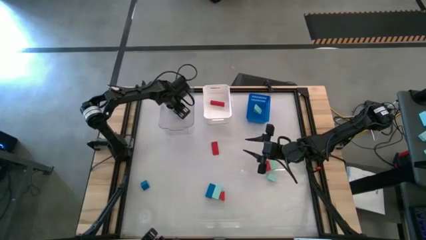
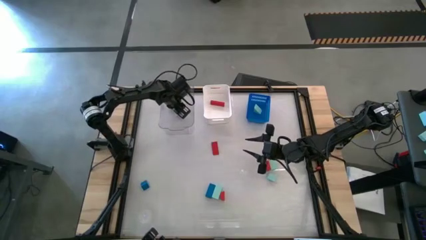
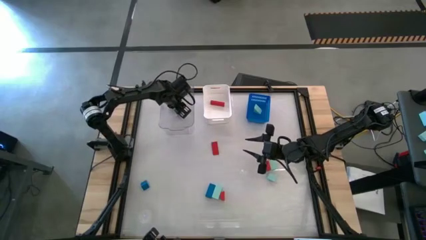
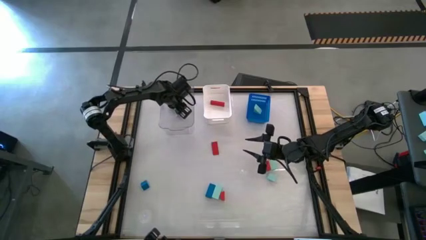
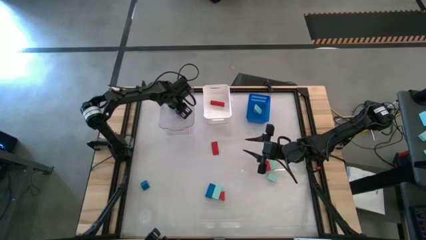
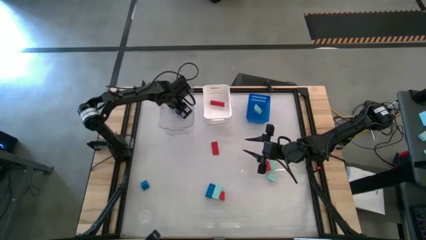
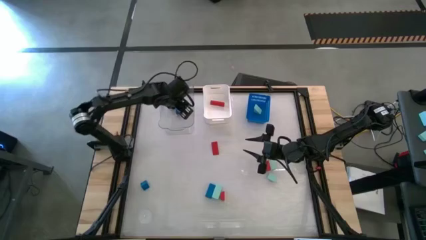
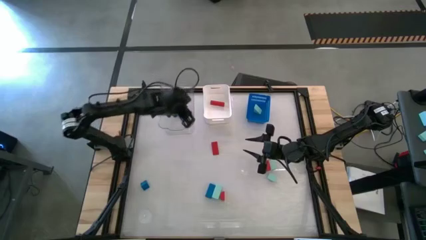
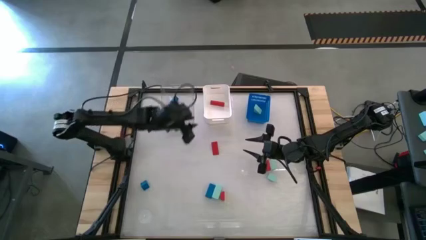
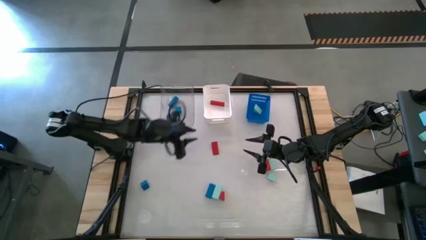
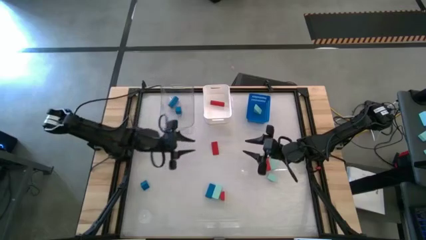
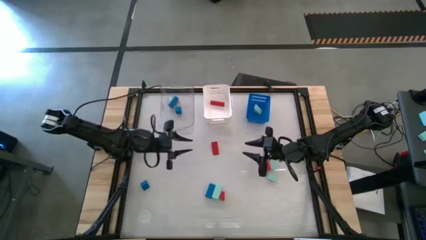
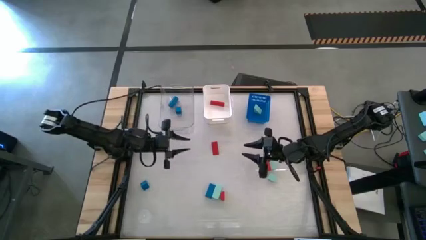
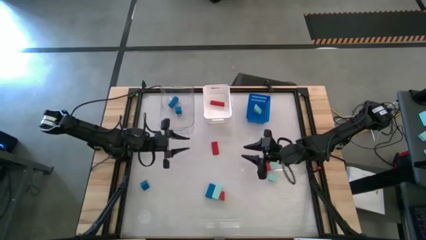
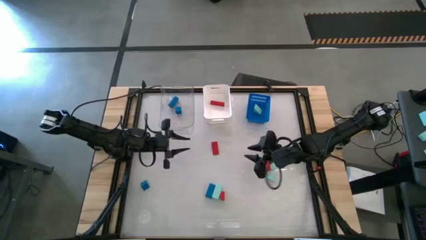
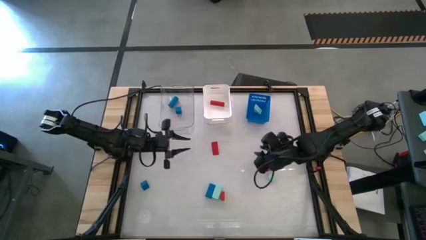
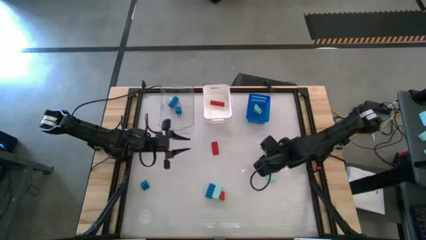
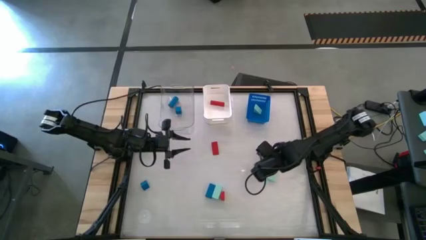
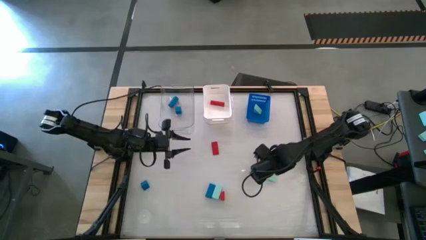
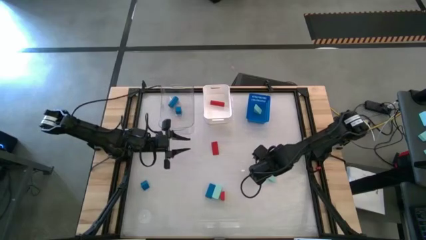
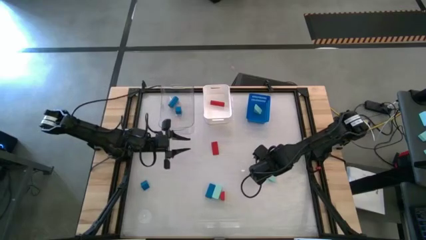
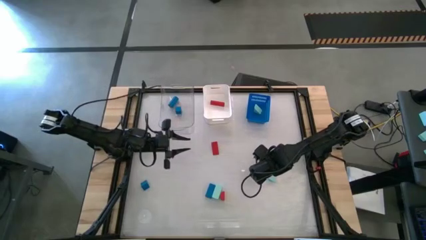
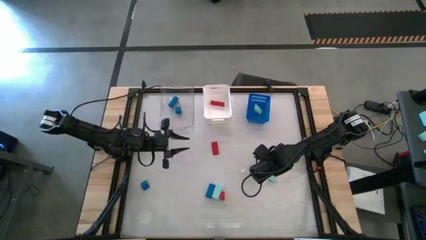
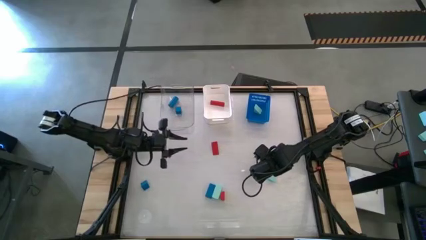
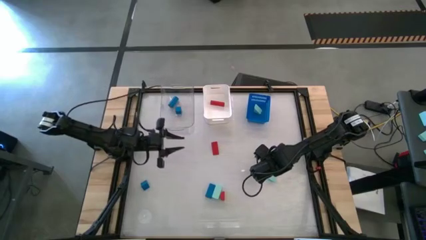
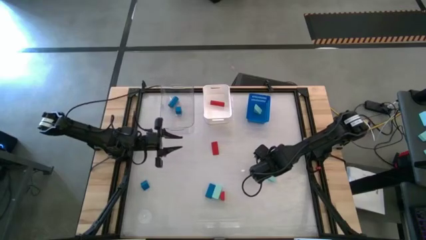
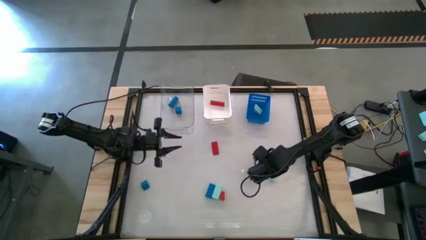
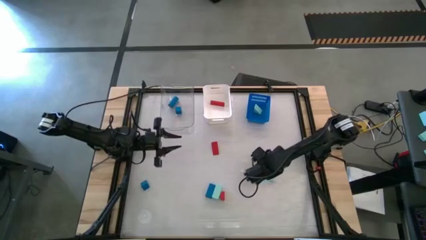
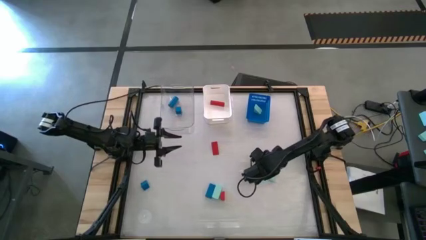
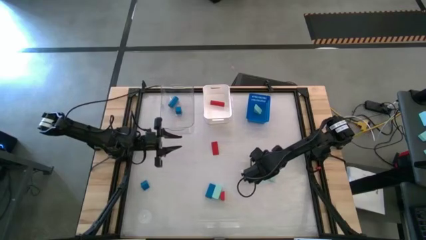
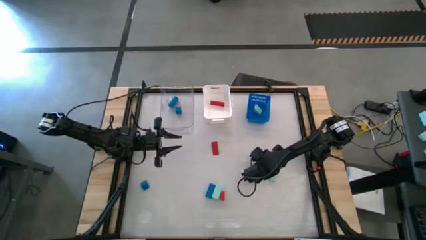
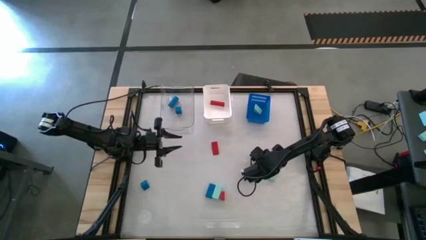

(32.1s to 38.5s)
Task: Sort & place blocks by color
Put the right red block into the white bin

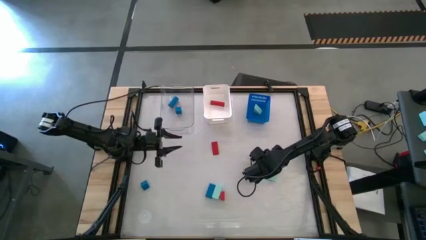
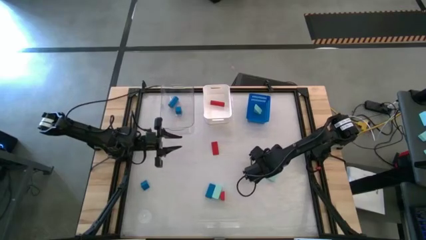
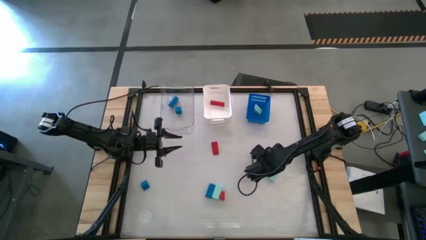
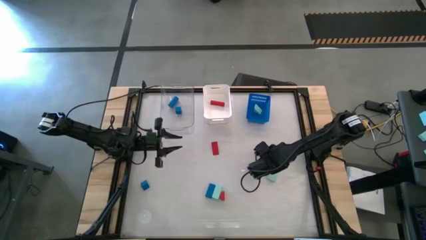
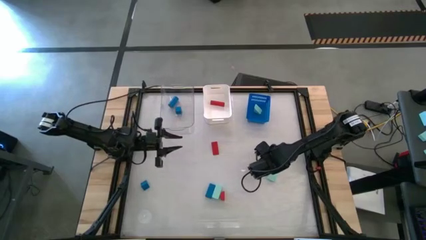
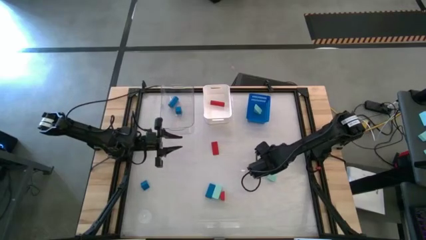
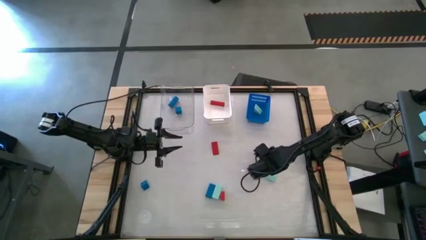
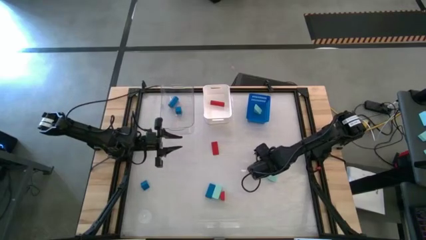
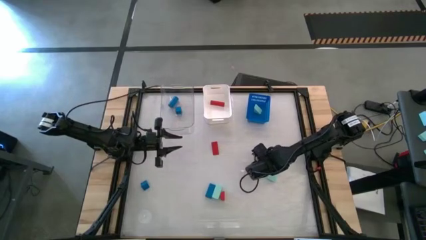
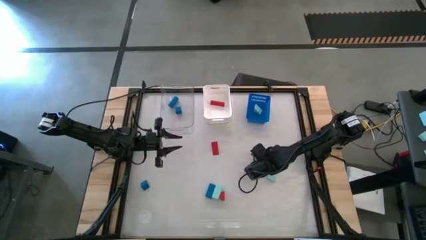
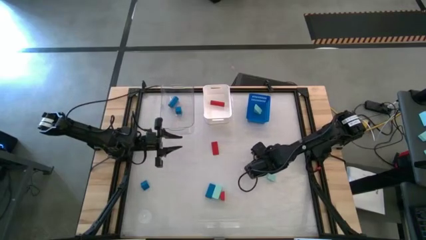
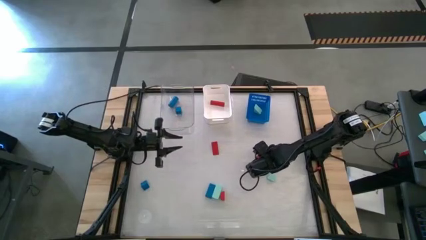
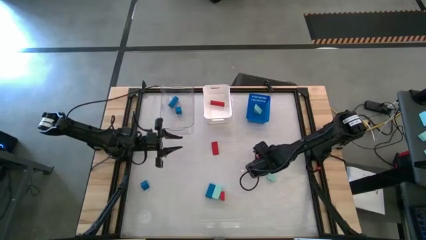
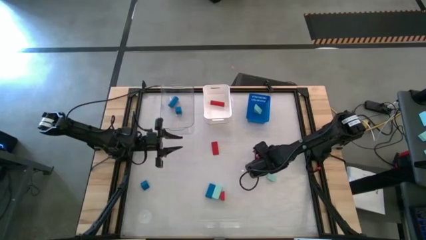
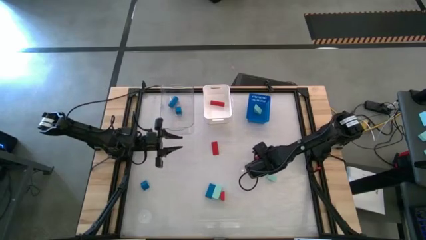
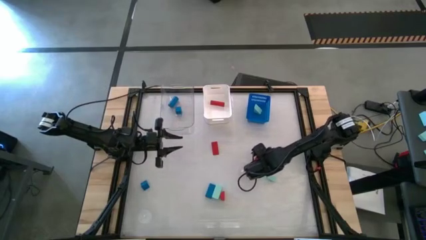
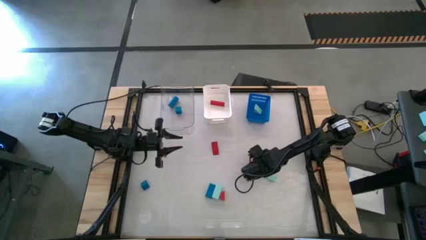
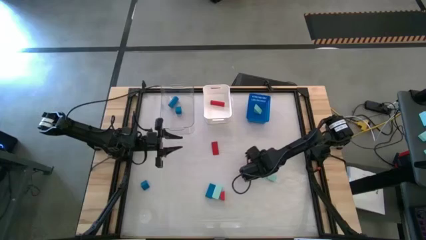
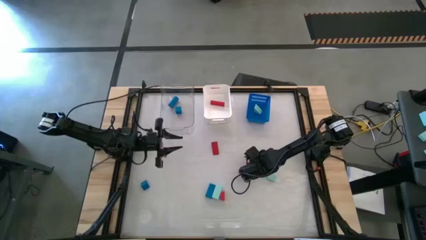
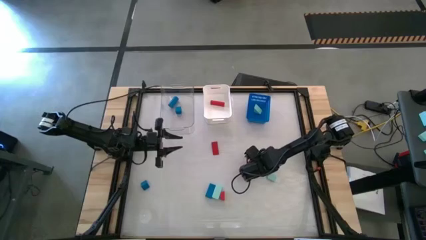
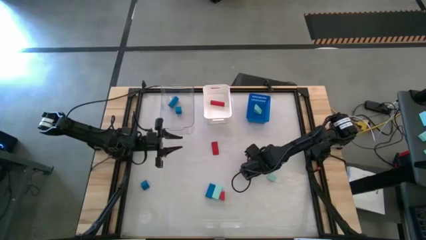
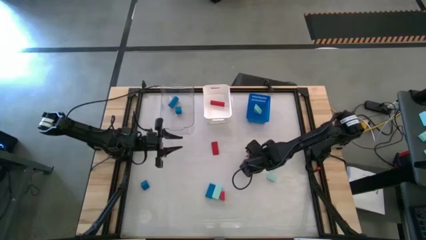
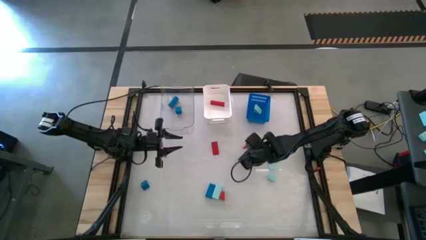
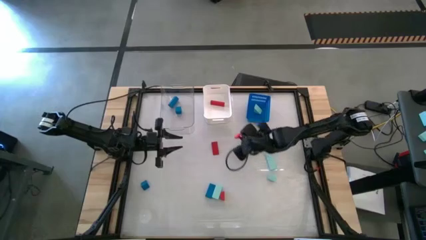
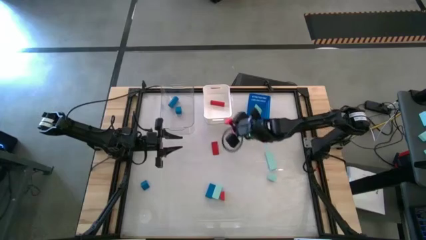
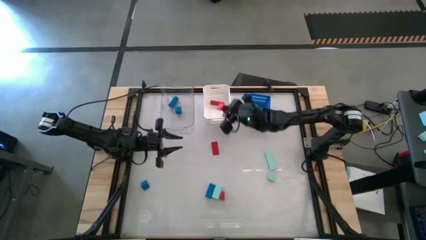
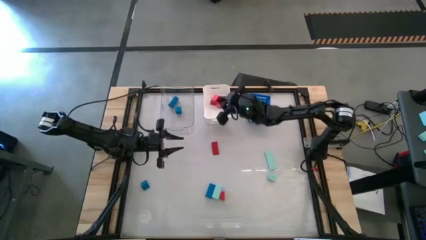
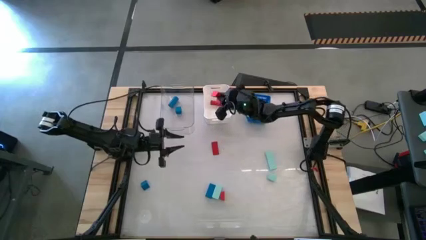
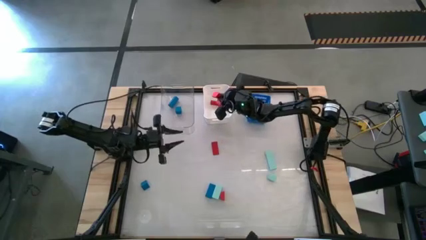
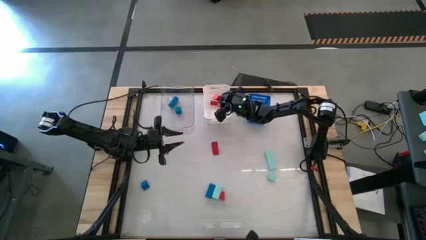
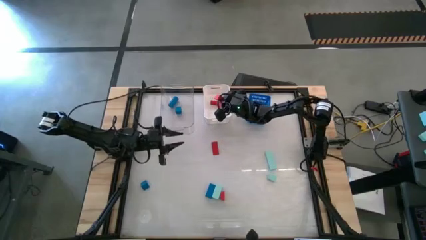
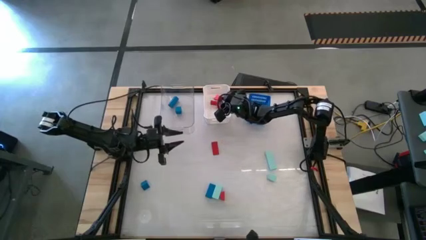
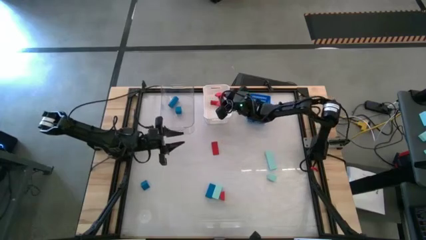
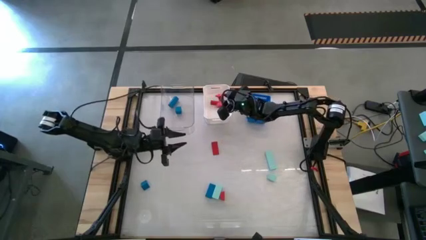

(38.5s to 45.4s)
Put the right red block into the white bin

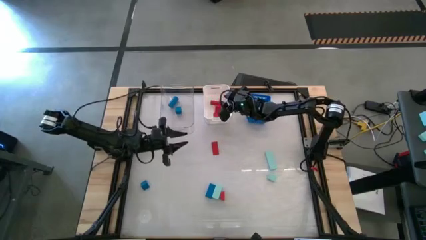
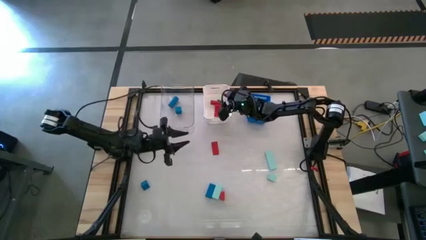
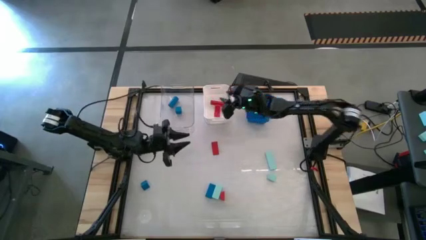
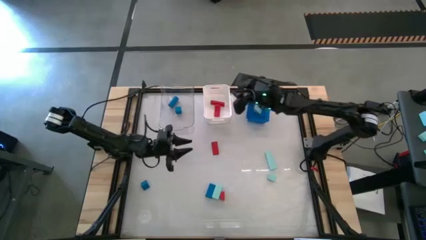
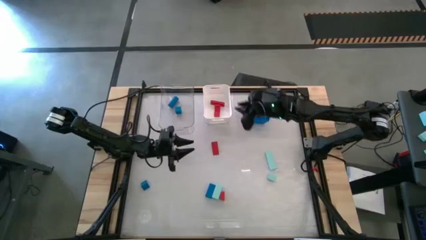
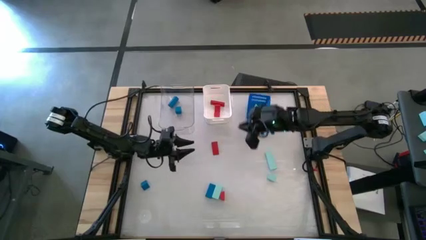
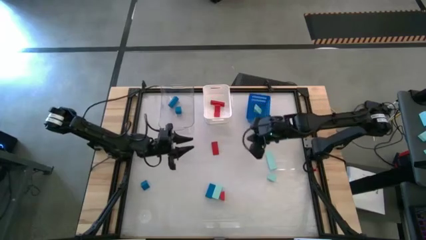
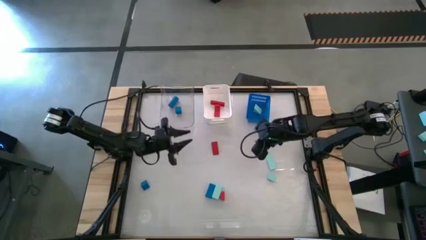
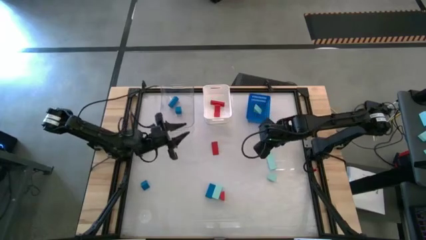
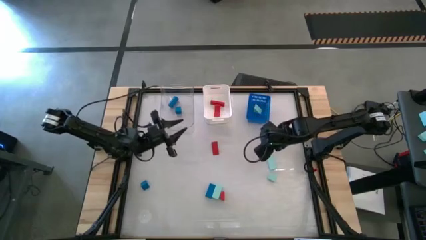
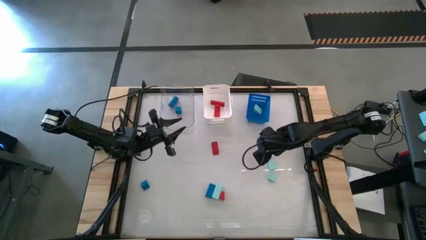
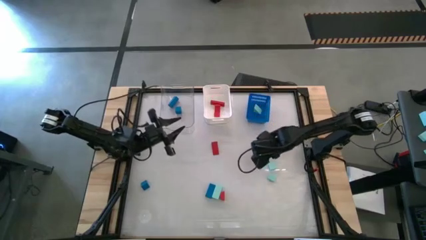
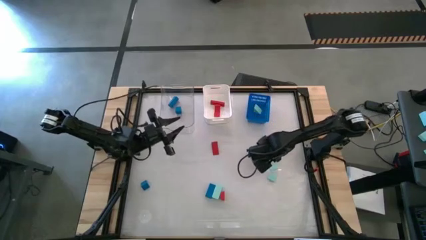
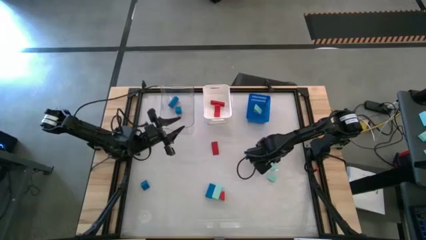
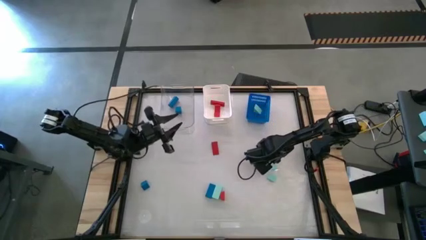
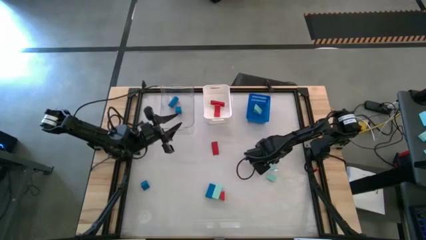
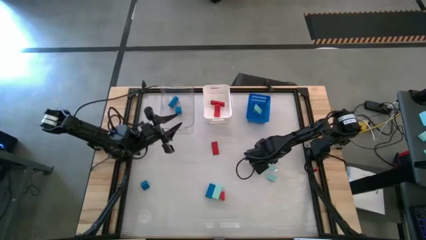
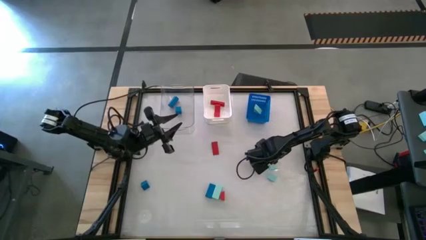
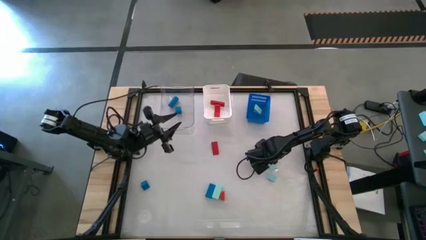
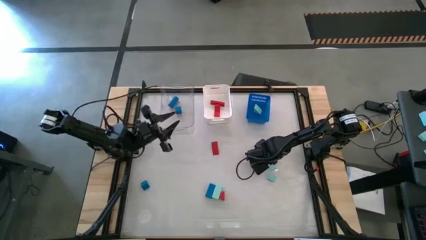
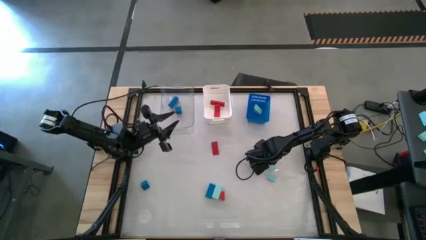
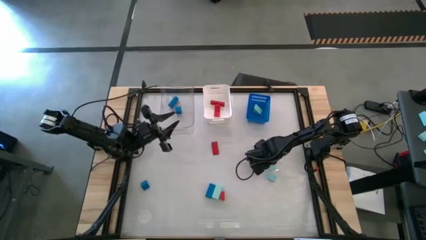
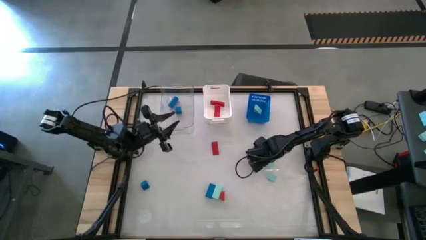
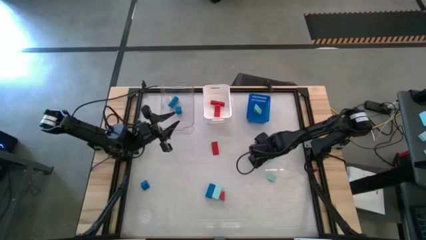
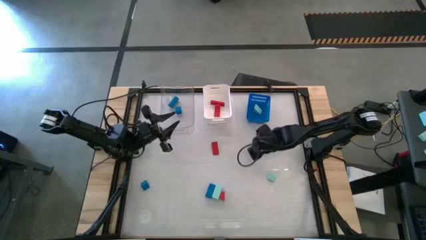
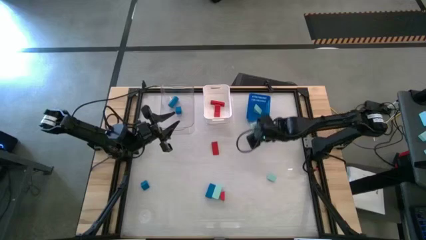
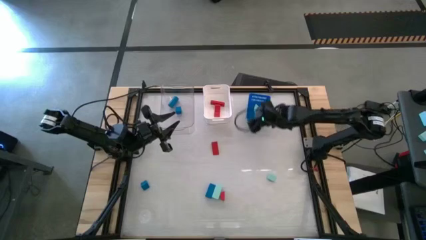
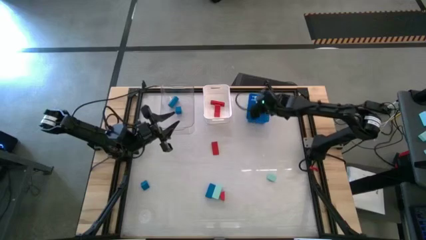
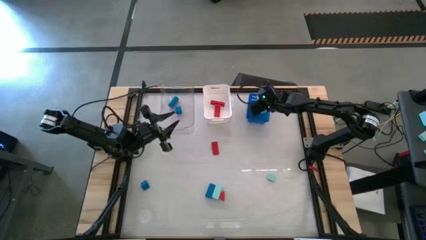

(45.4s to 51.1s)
Put the top light blue block into the blue bin
